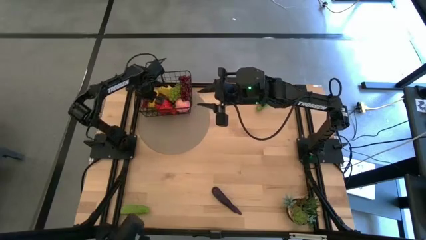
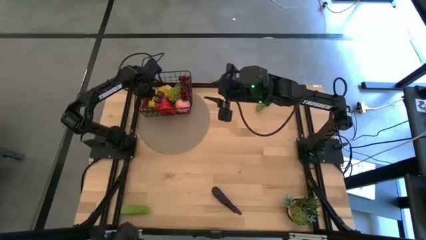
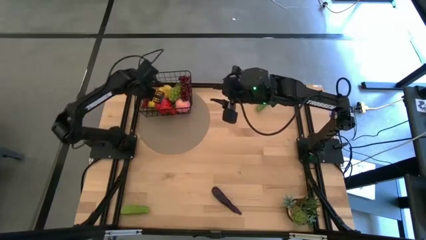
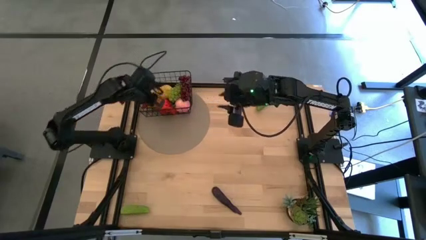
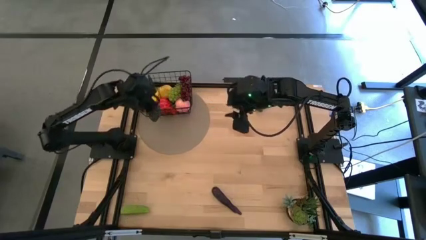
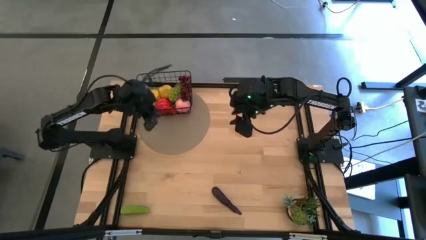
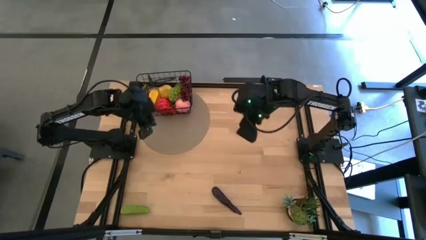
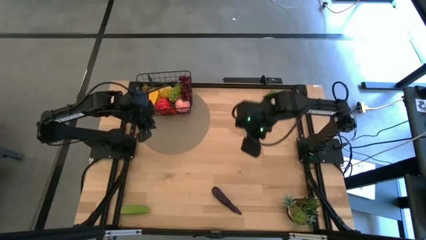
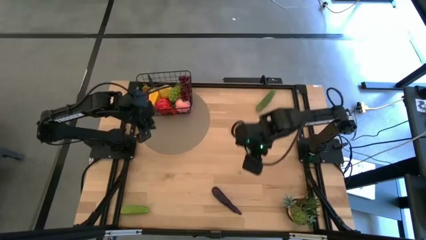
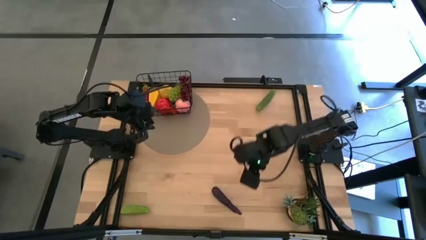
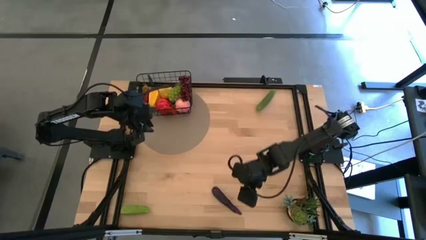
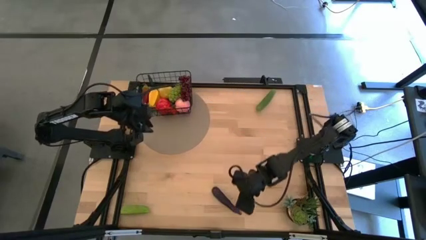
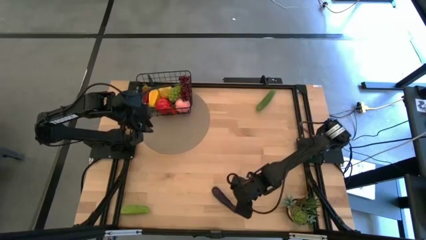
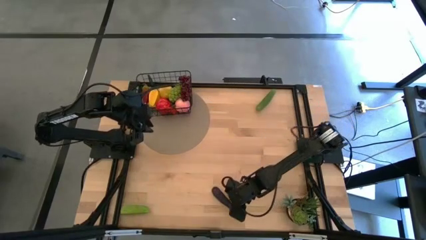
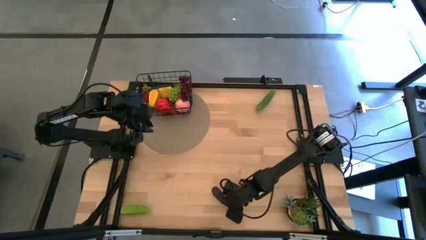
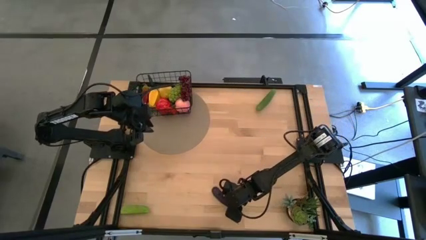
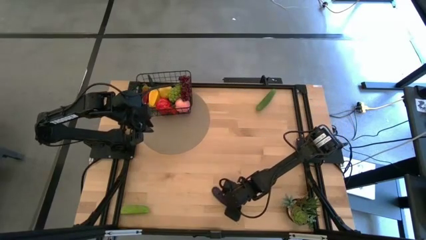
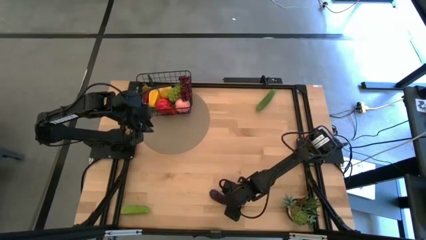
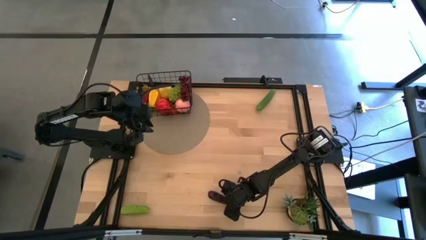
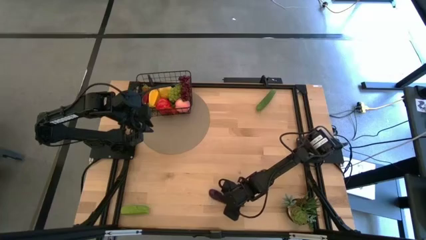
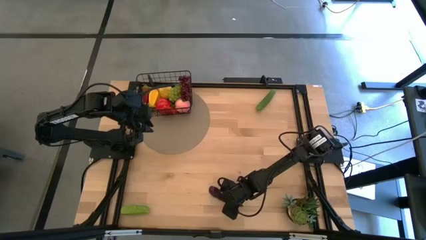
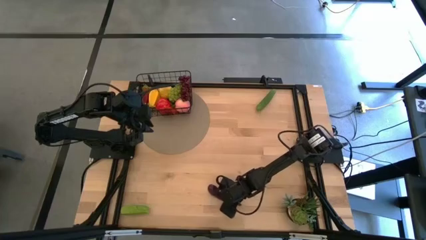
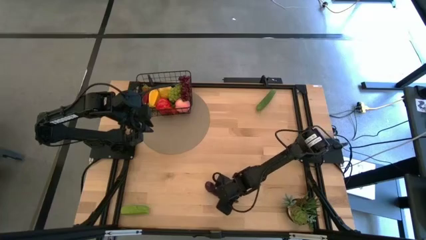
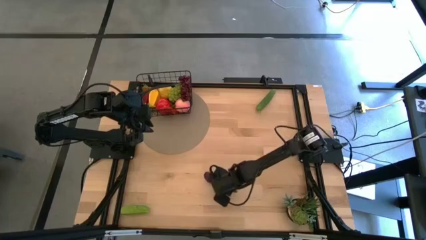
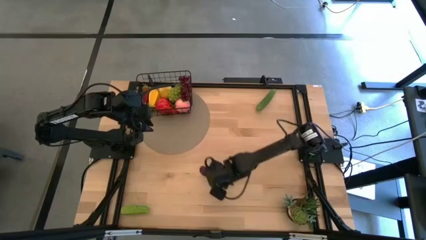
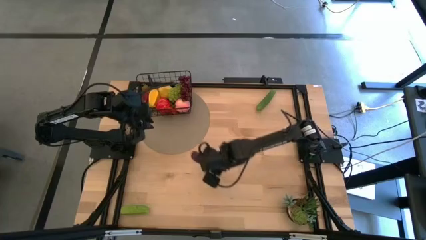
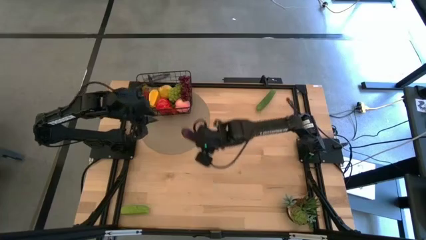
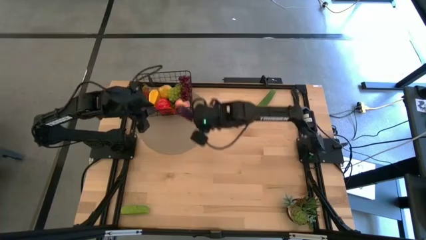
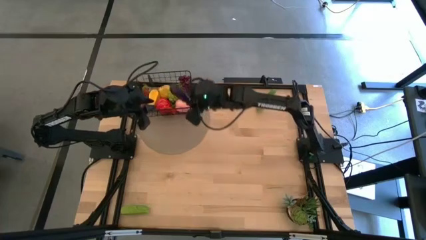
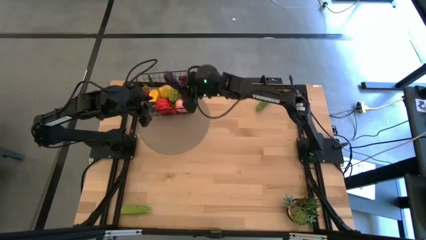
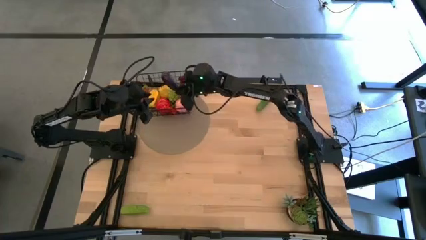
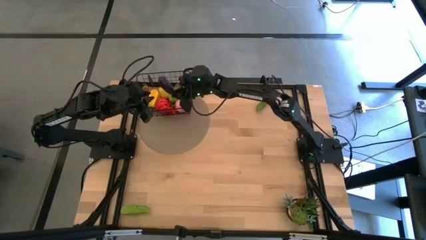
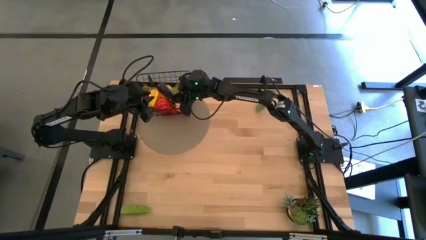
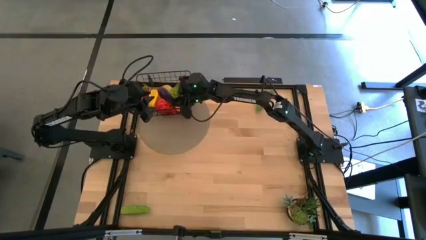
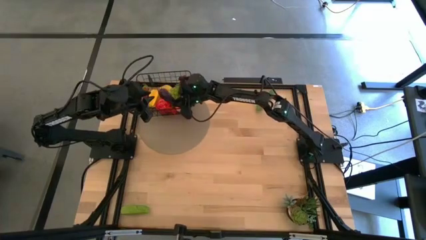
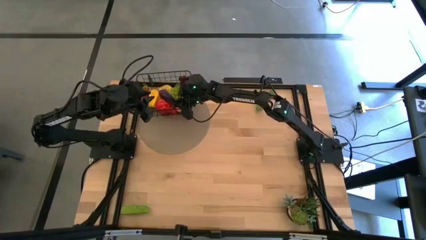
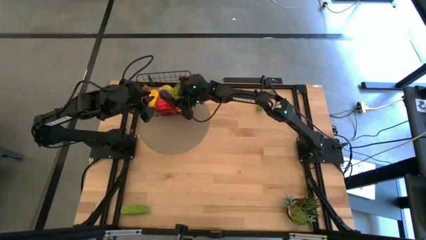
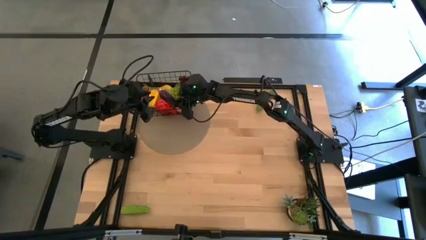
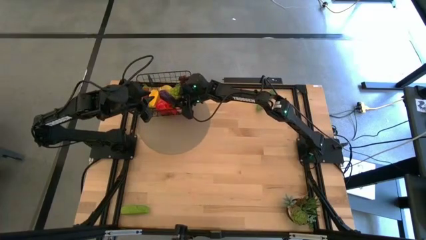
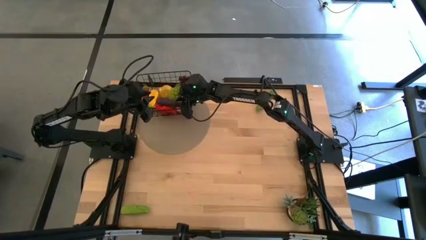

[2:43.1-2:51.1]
Task: Build produce basket
Put the violet eggplant into the black wire basket

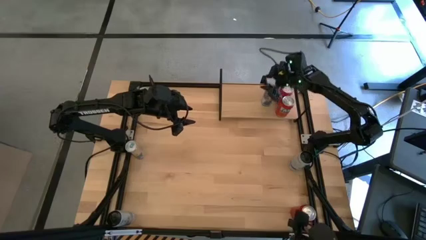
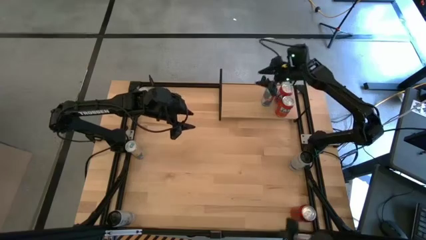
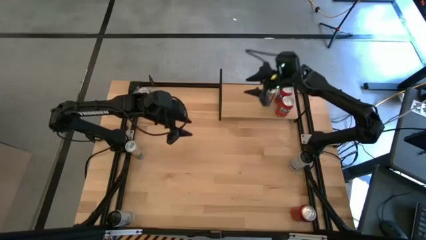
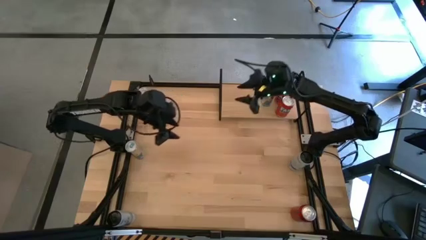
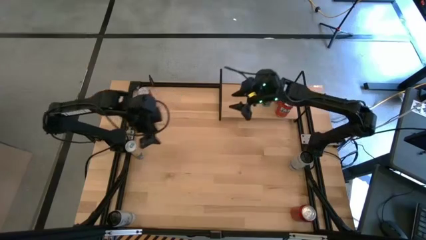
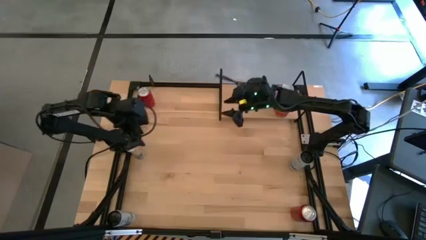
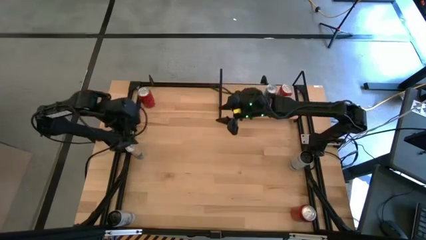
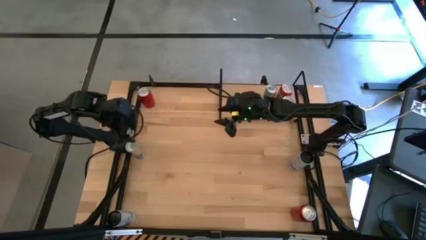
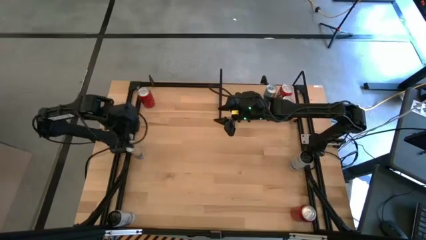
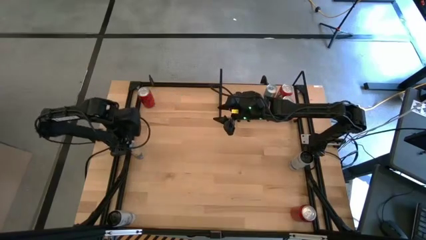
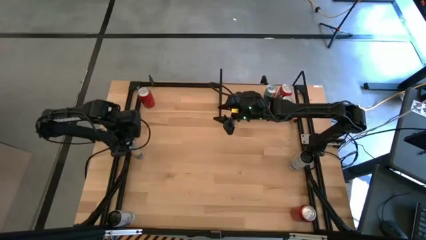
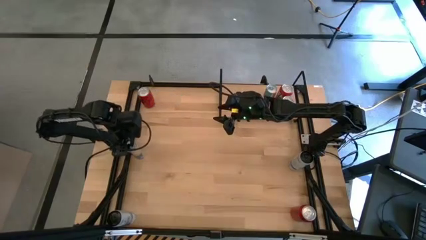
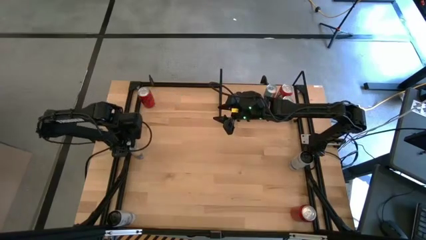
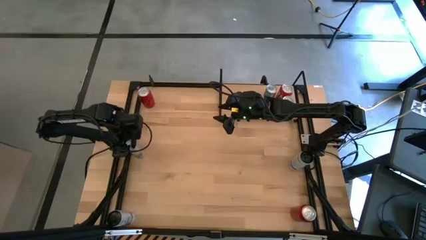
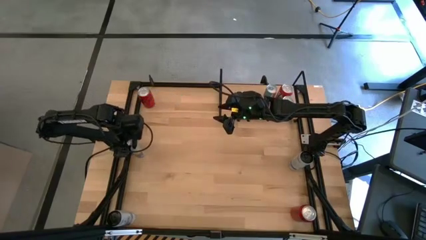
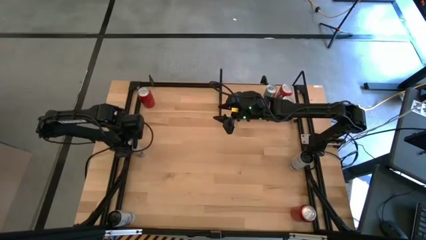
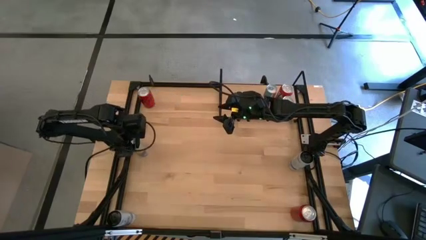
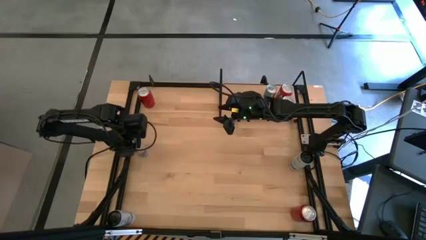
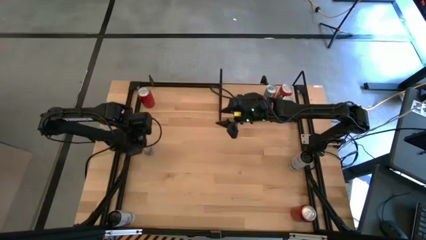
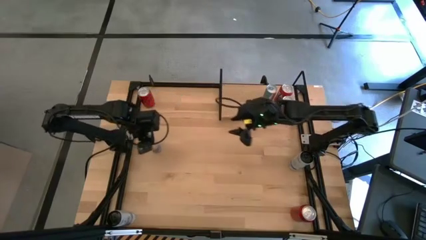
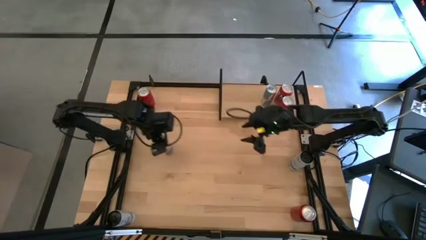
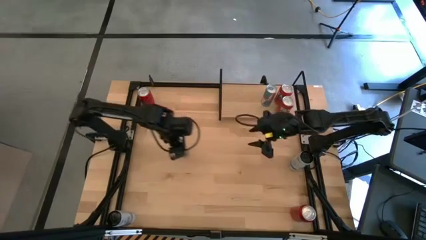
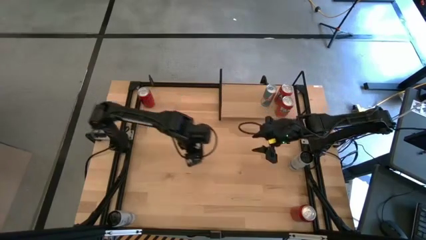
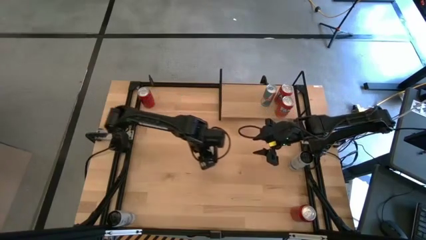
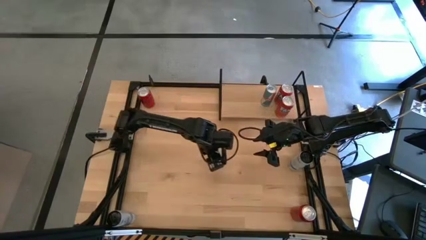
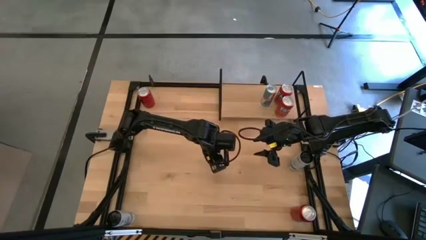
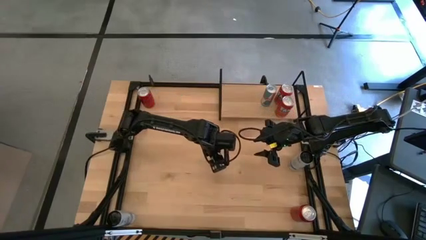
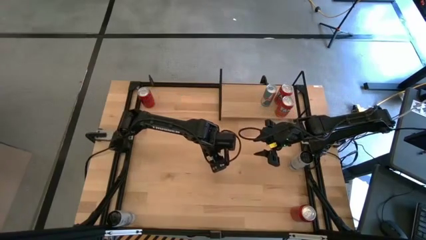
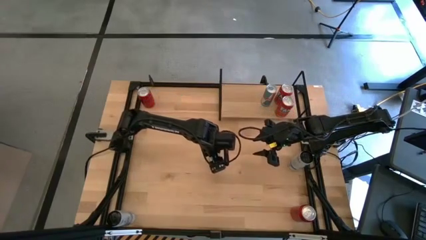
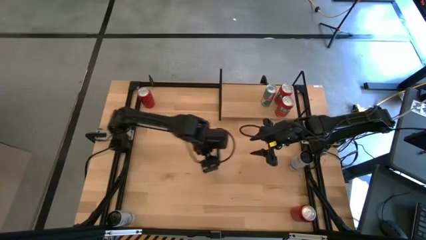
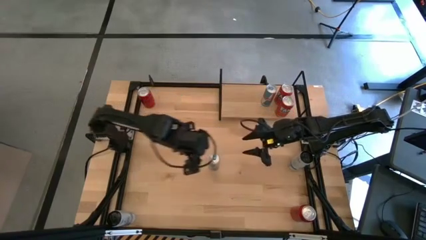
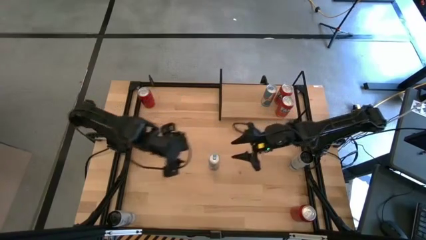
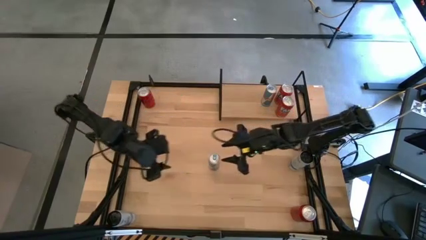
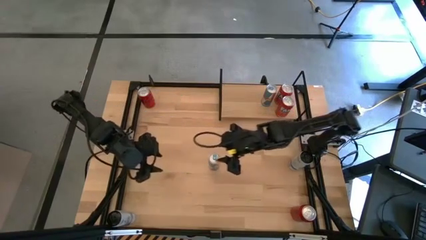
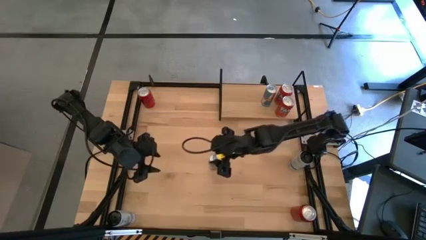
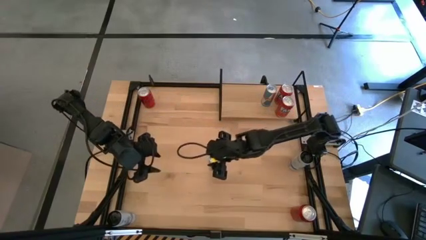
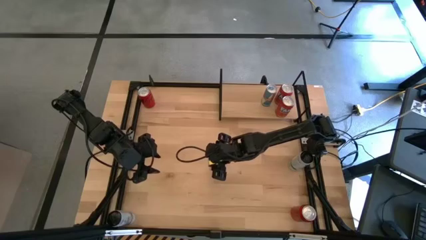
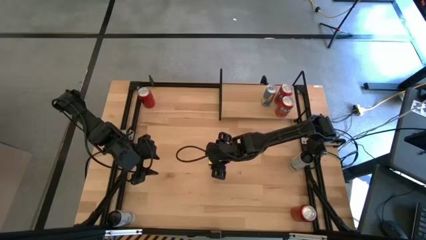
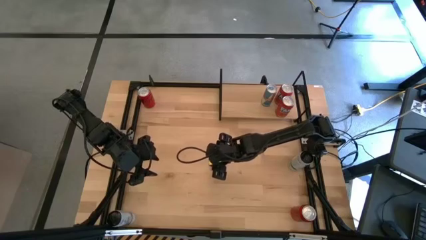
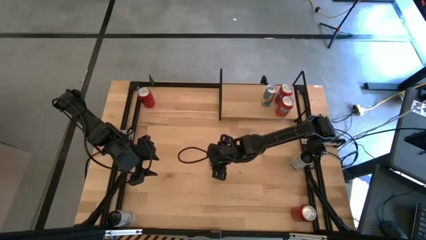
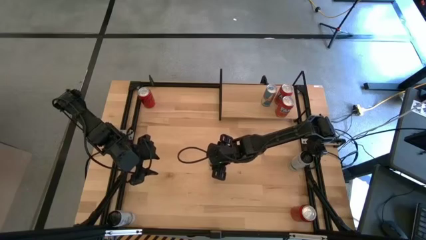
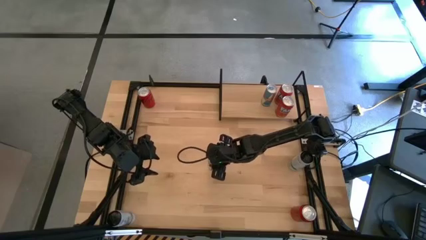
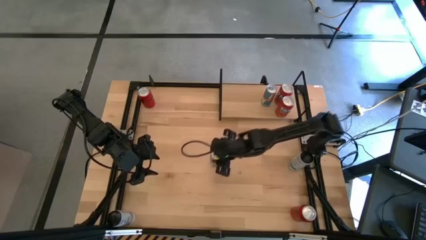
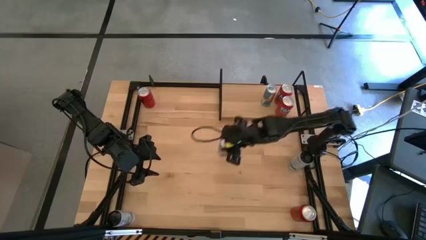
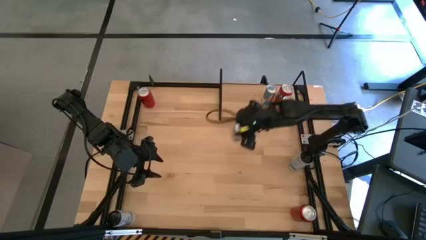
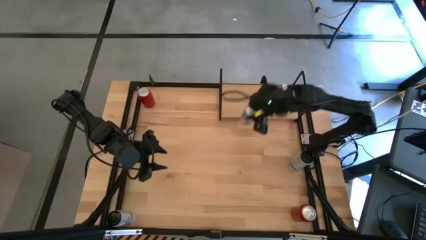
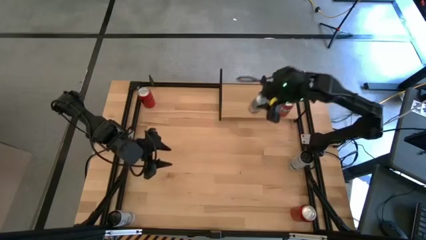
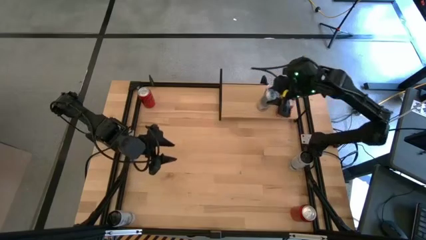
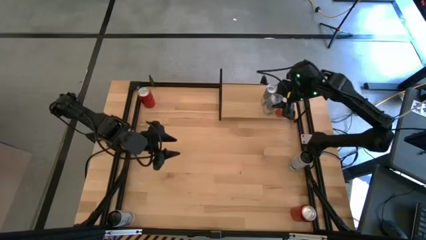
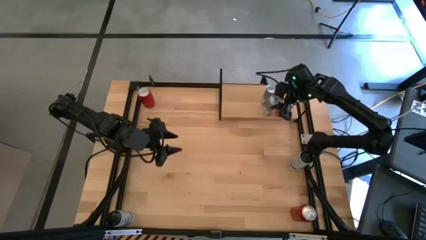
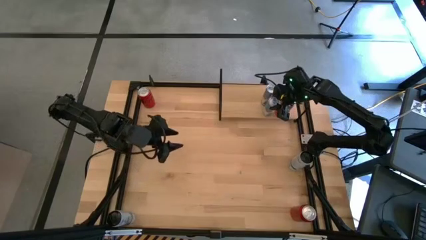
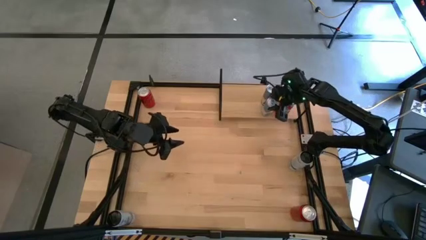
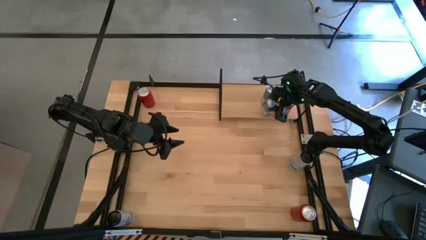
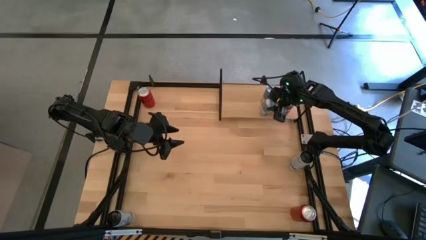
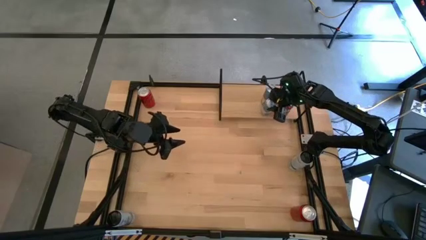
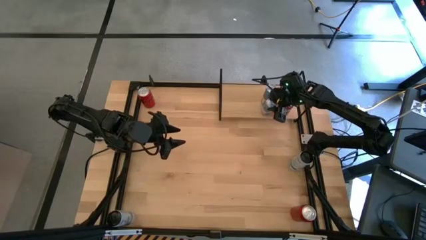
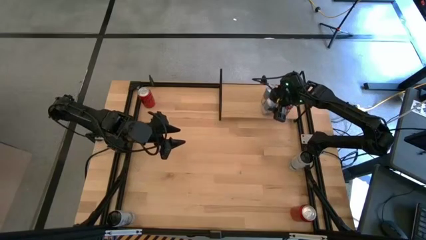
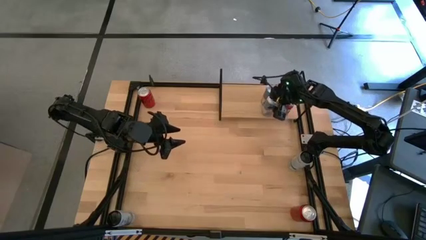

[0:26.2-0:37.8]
Task: Place canned beverage on shelf
Put the blue soda can on the shelf aligned with the other blue soda can
